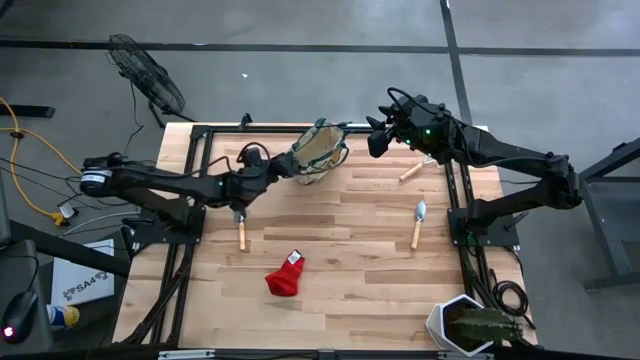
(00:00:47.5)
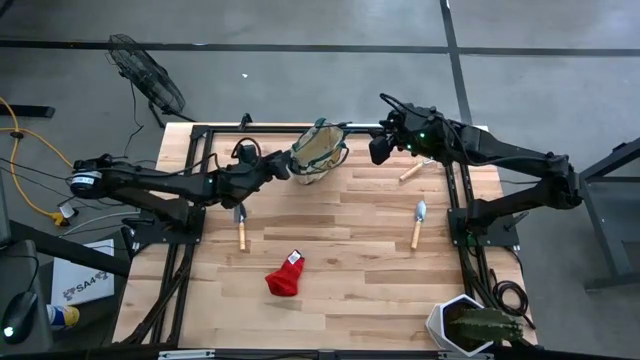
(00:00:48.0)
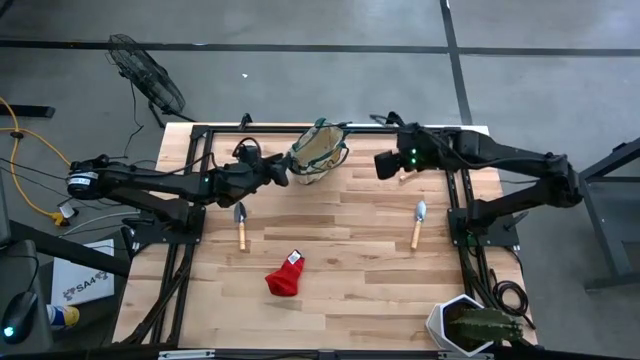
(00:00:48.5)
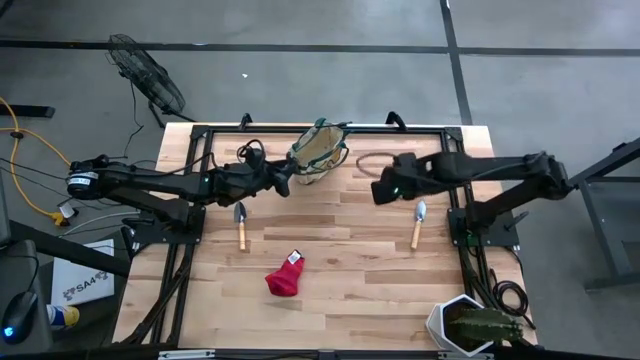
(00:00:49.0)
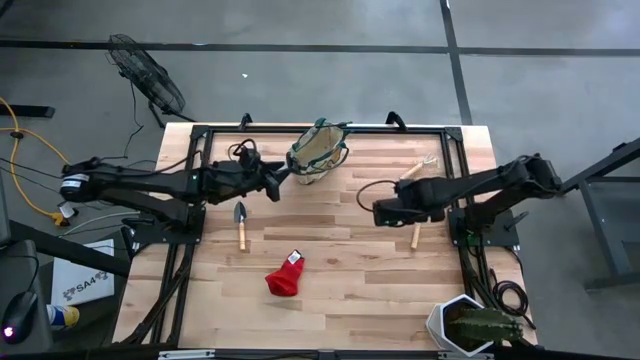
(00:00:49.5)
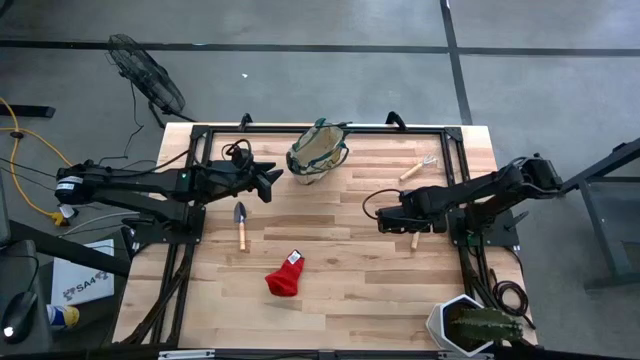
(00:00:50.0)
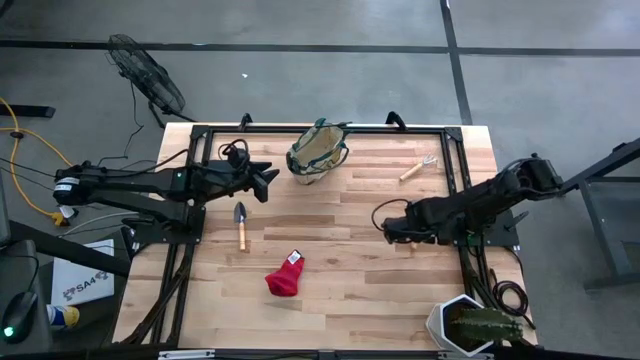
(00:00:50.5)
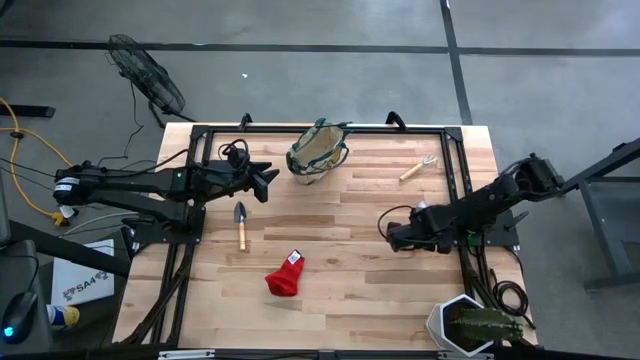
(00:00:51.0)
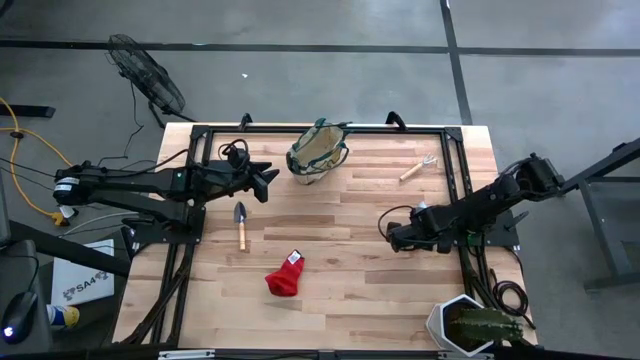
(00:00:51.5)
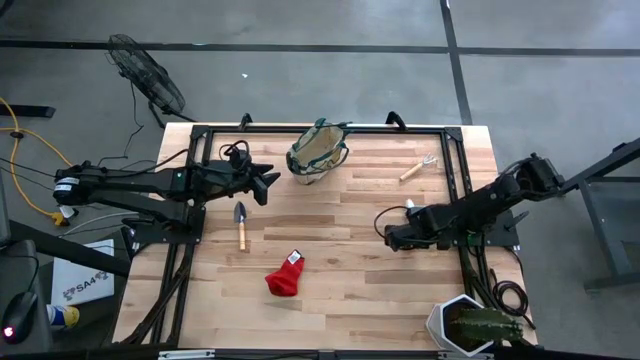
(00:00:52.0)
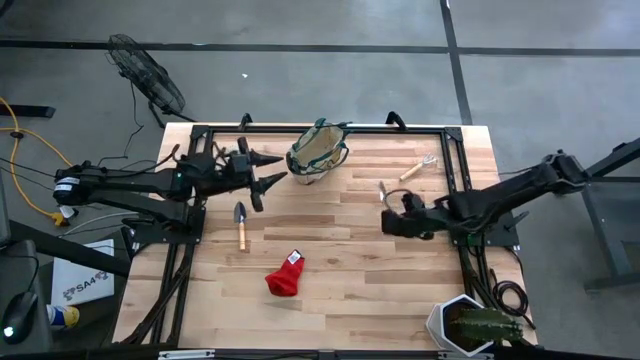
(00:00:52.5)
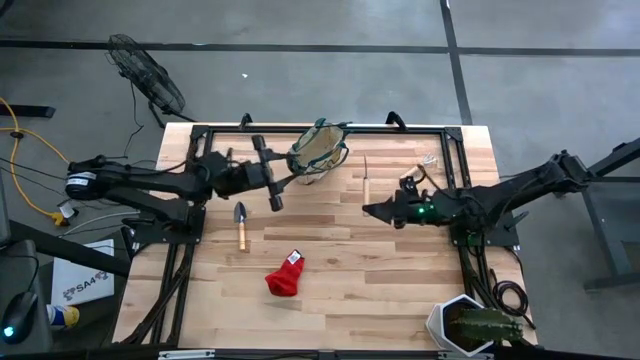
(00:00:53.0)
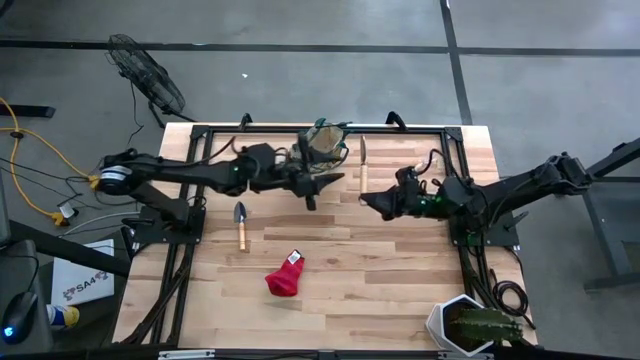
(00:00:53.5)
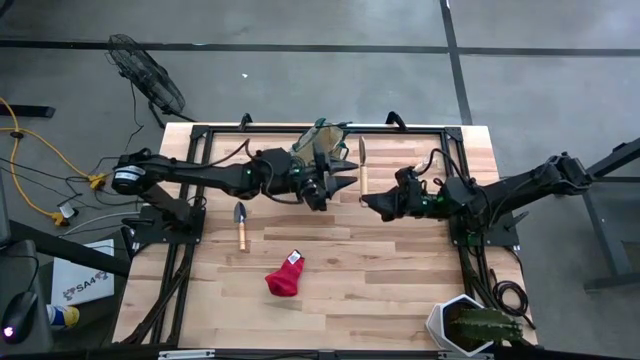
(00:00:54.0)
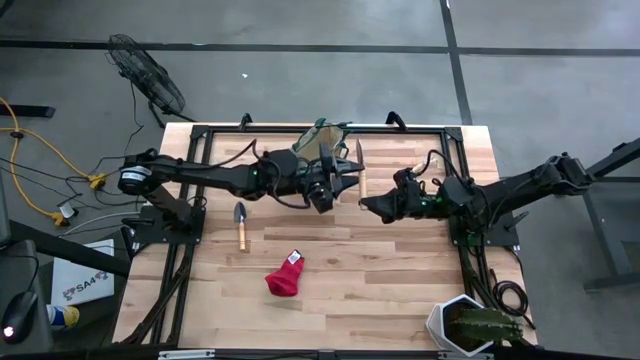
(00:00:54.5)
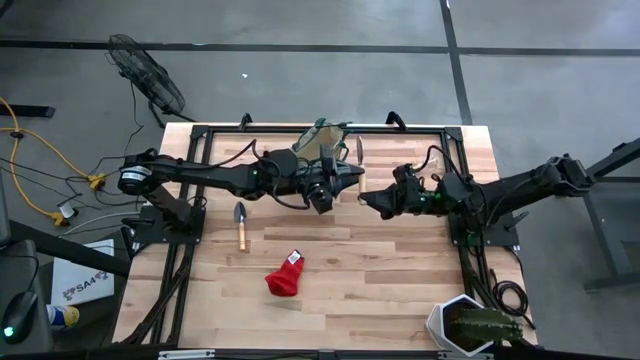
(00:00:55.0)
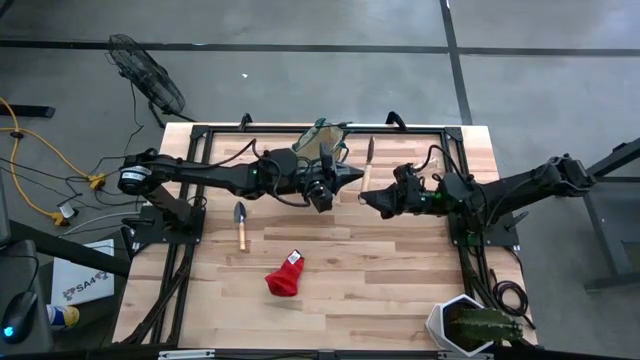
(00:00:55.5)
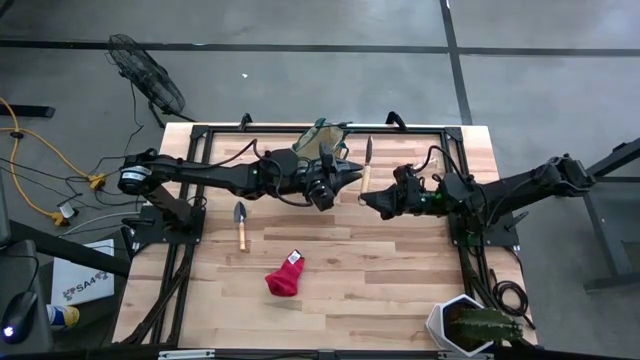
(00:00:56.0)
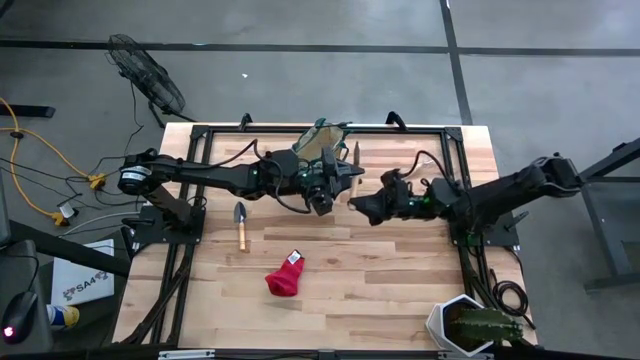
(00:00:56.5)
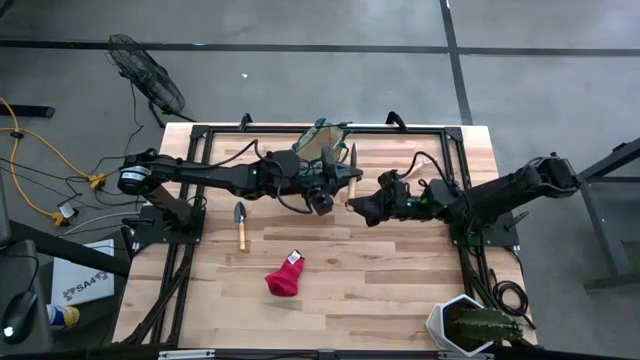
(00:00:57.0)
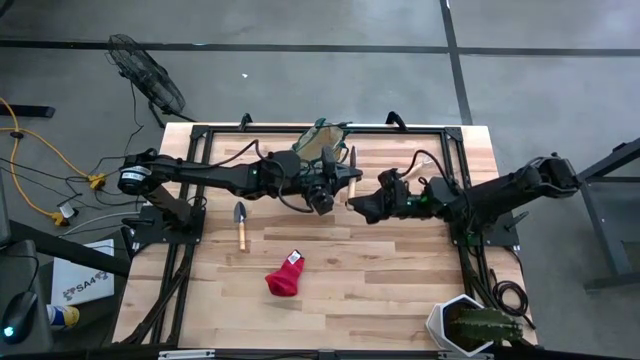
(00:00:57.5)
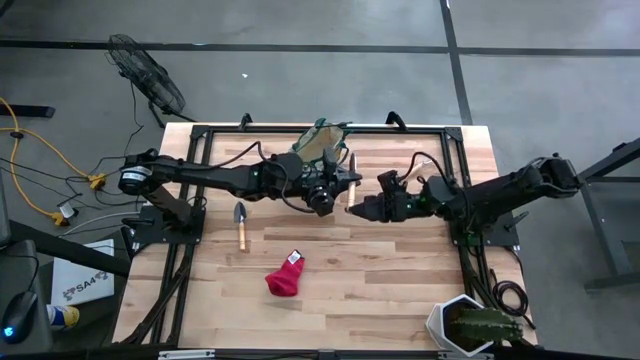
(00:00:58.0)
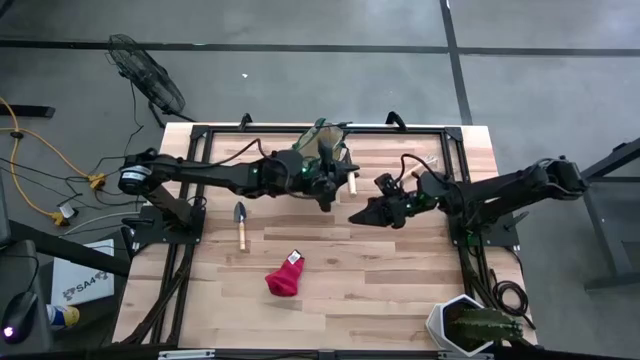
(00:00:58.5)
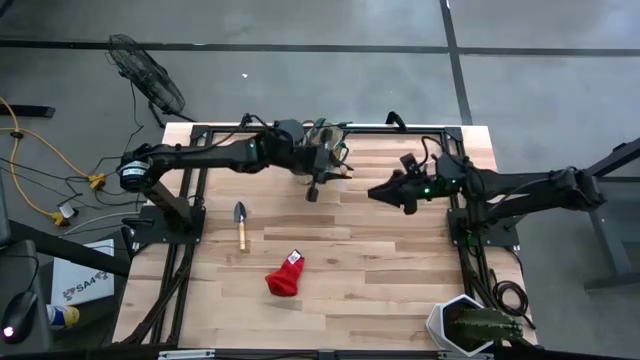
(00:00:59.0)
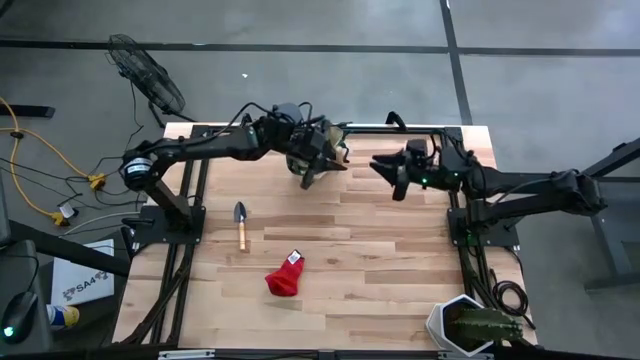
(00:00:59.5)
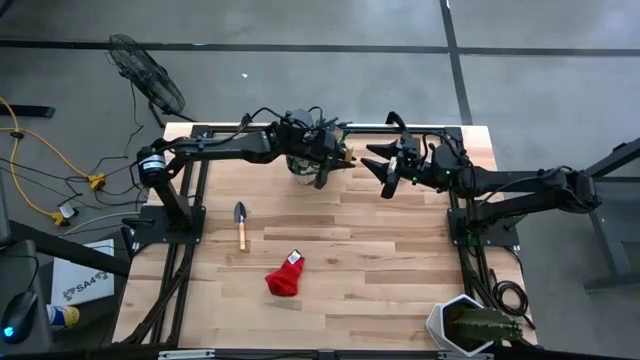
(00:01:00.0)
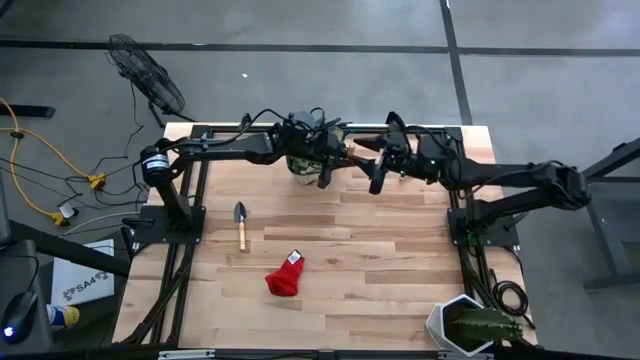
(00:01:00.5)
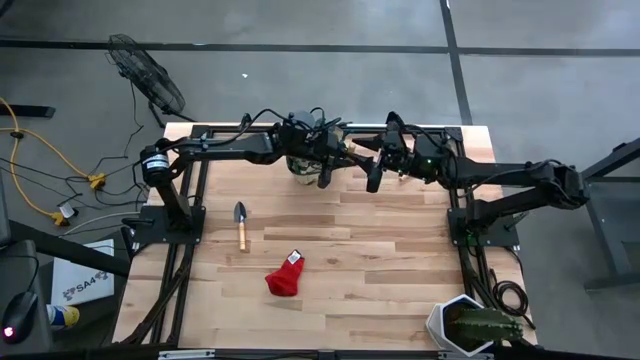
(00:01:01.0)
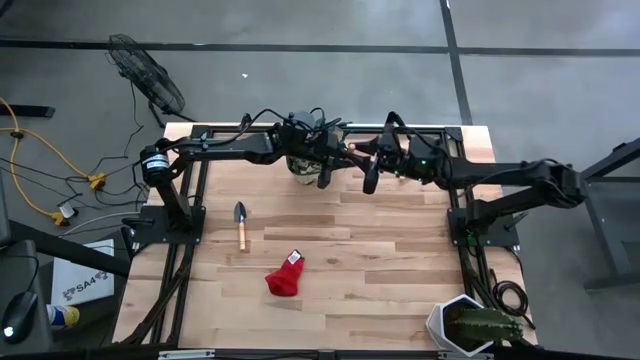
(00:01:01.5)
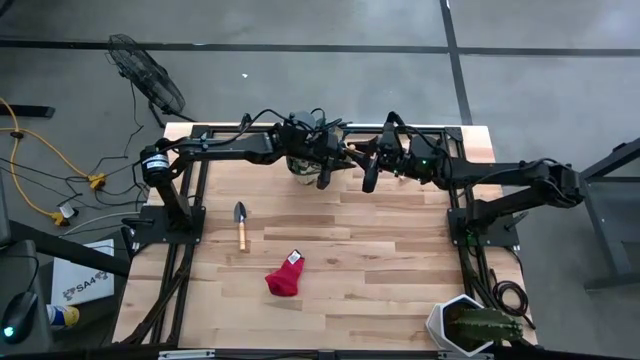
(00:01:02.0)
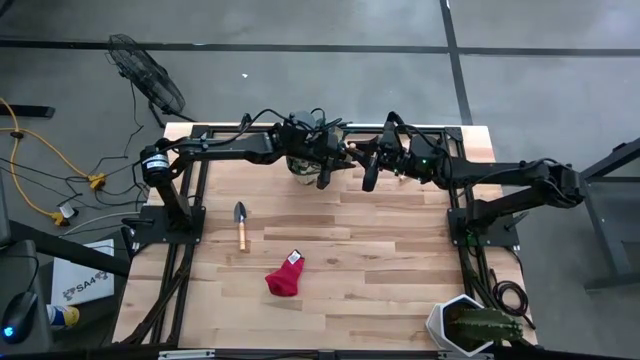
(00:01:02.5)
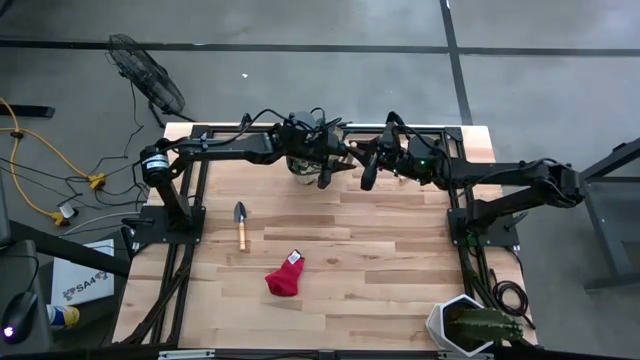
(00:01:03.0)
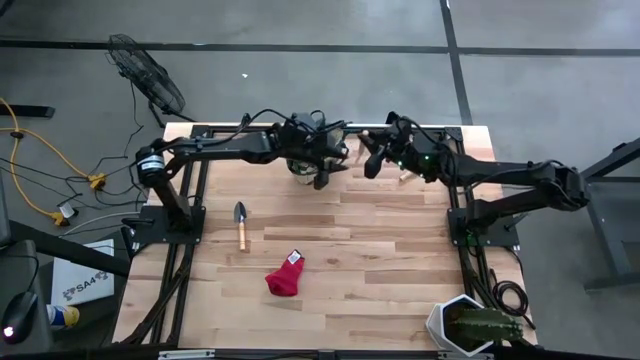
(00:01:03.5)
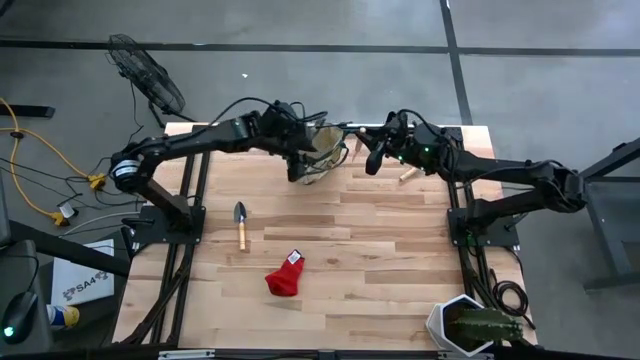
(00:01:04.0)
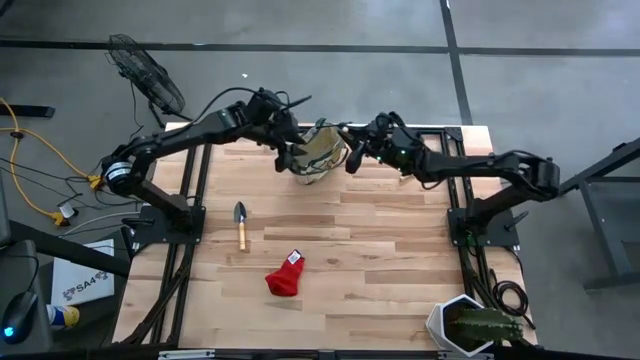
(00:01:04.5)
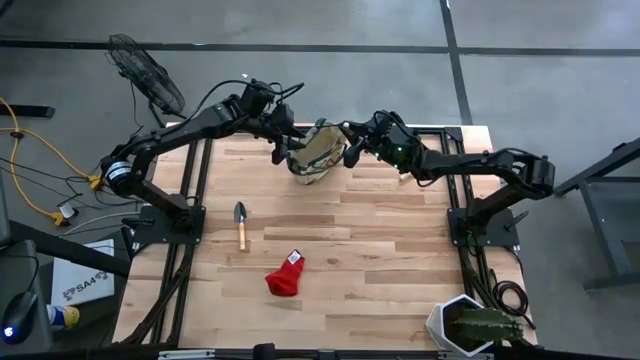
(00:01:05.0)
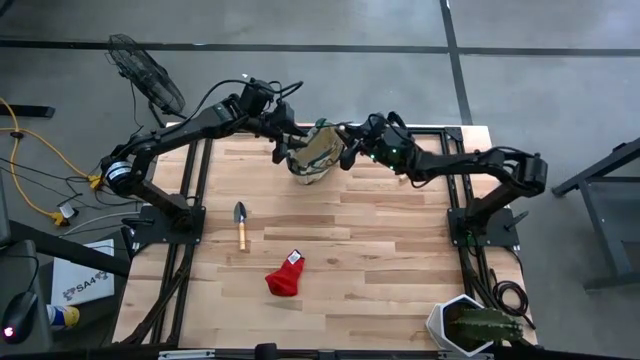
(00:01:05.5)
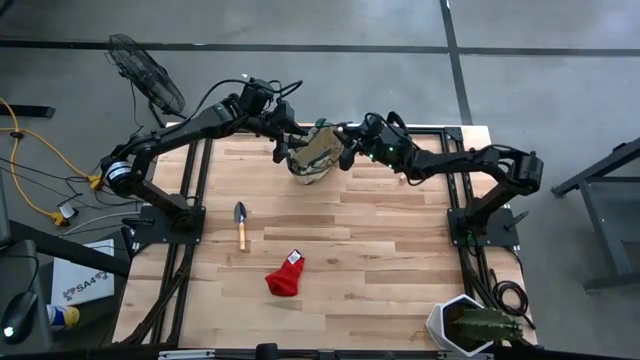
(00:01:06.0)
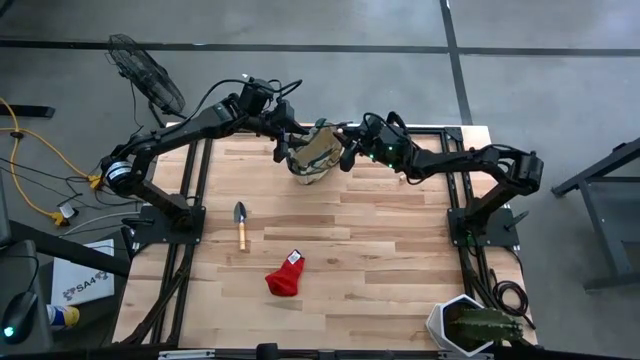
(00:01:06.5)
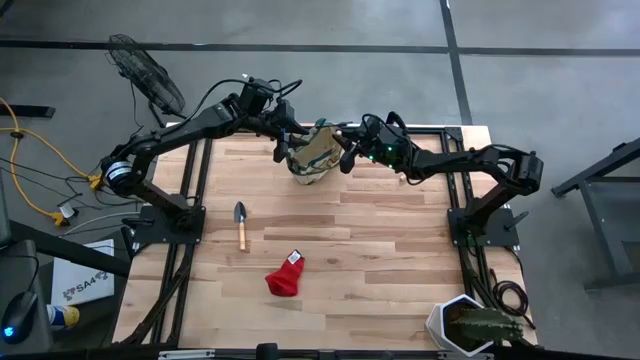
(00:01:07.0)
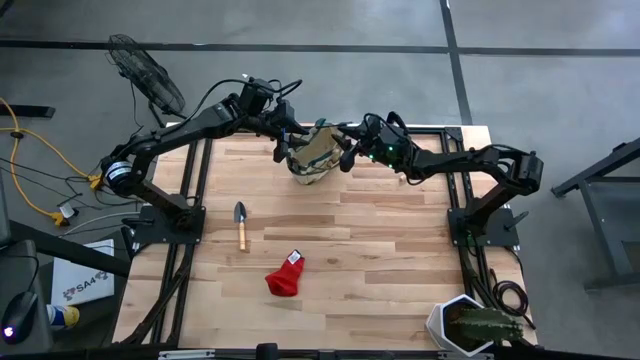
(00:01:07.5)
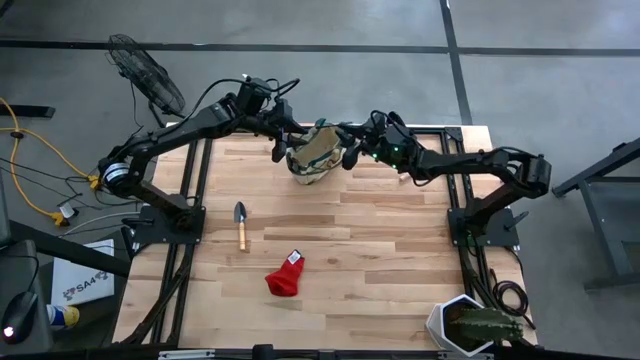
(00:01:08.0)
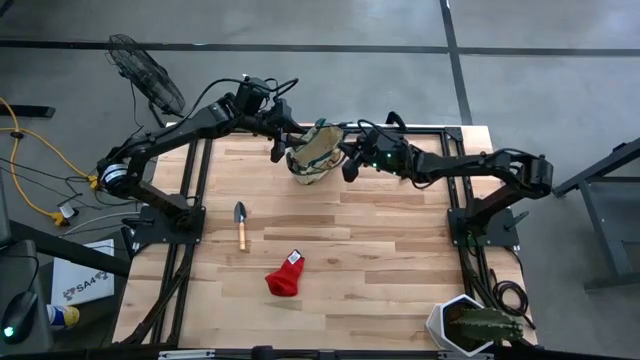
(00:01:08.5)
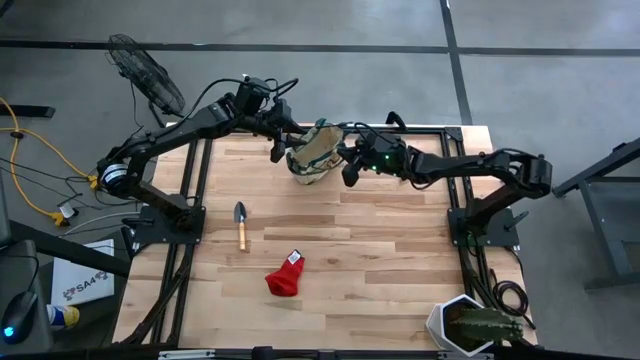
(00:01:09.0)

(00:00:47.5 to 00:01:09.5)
Task: Pick & Place Garden tools in Gardening bag
Put the brown trowel into the white gardening bag
